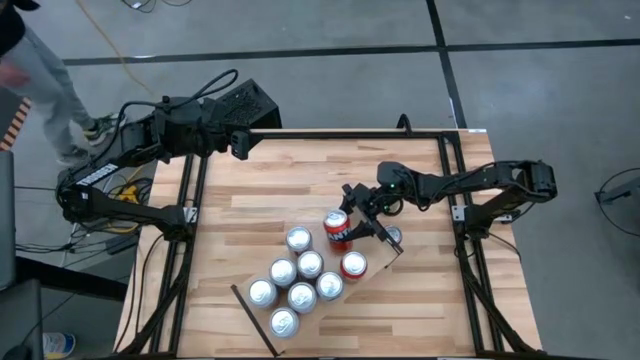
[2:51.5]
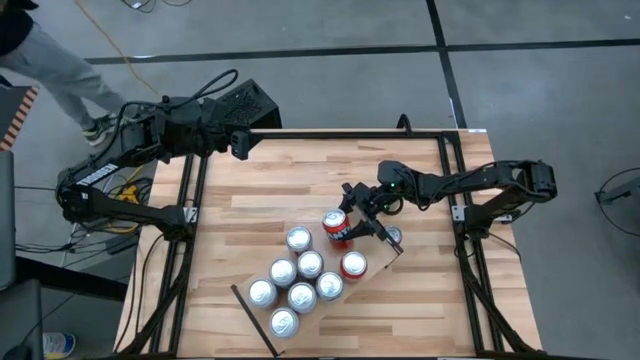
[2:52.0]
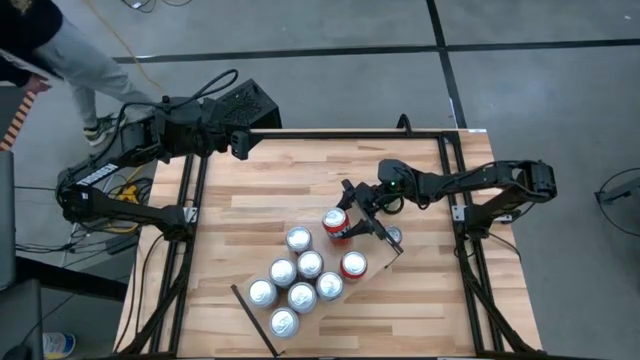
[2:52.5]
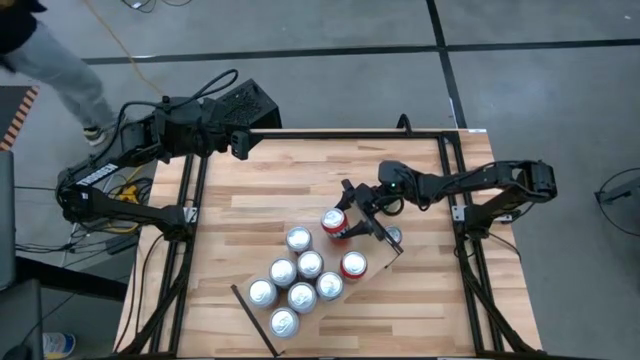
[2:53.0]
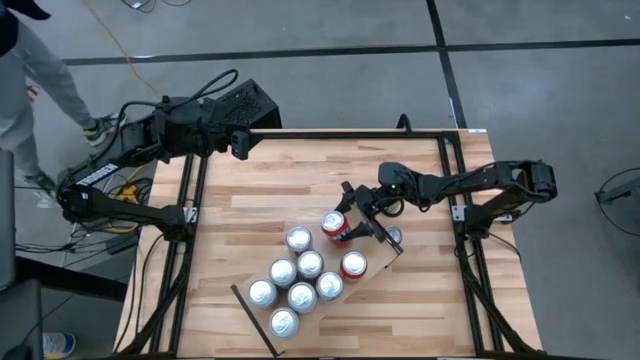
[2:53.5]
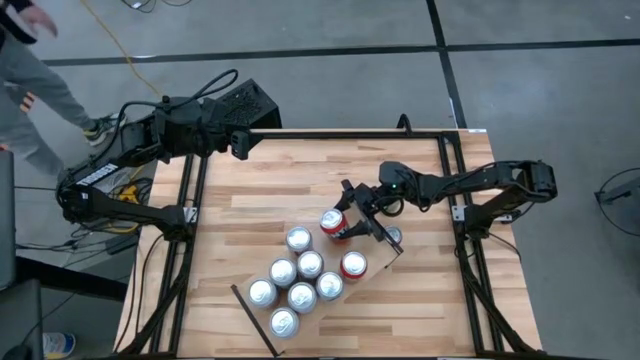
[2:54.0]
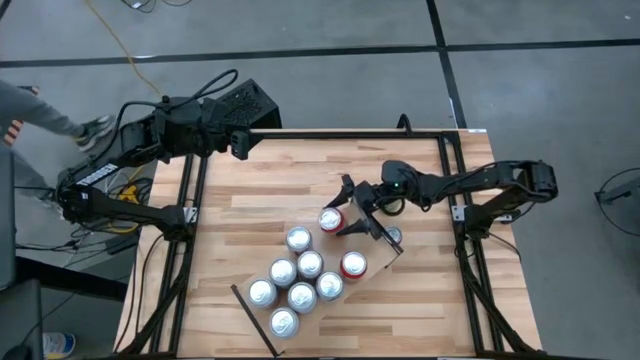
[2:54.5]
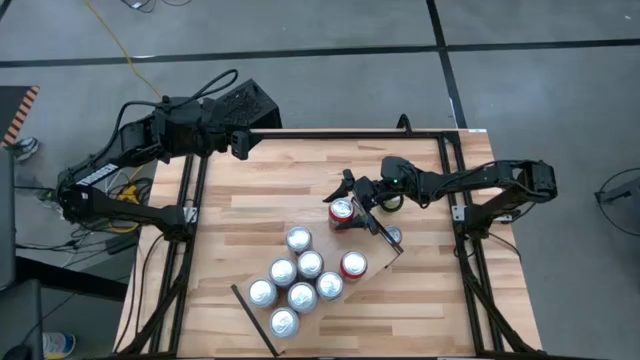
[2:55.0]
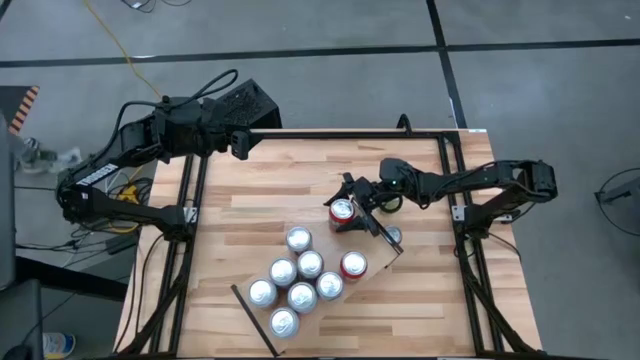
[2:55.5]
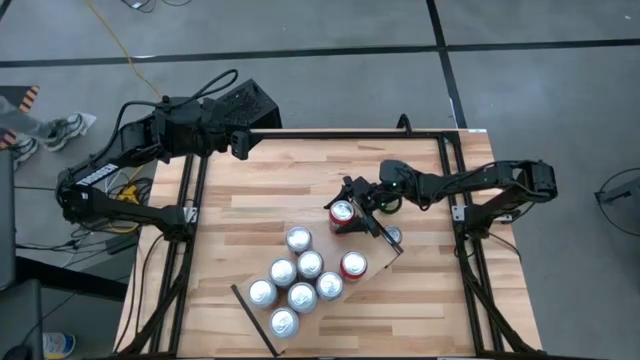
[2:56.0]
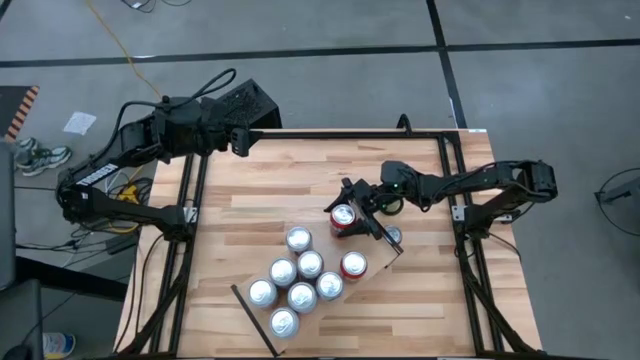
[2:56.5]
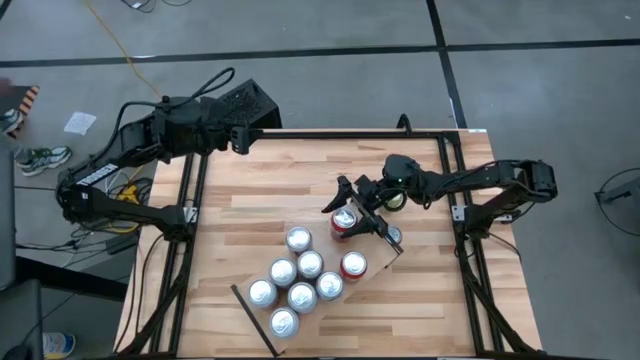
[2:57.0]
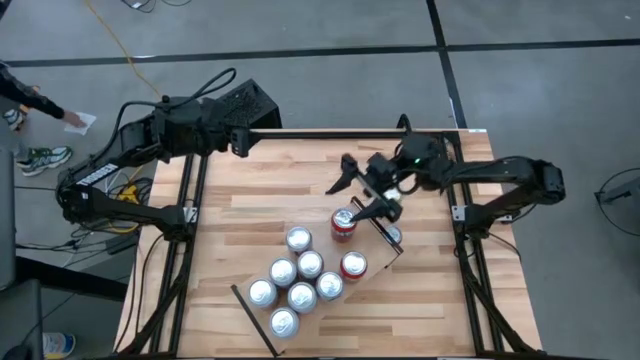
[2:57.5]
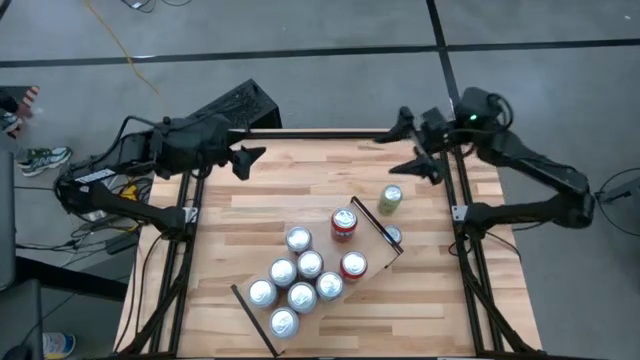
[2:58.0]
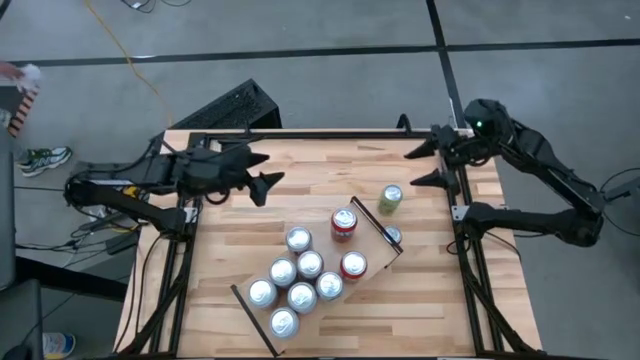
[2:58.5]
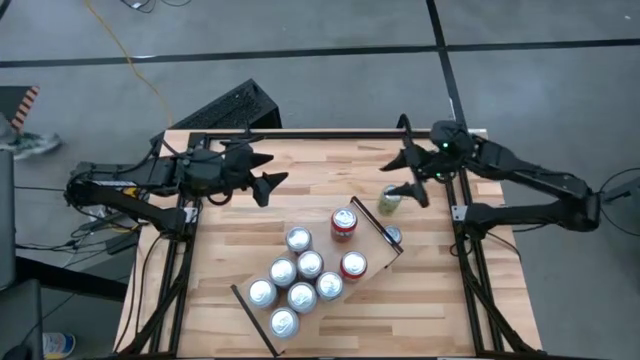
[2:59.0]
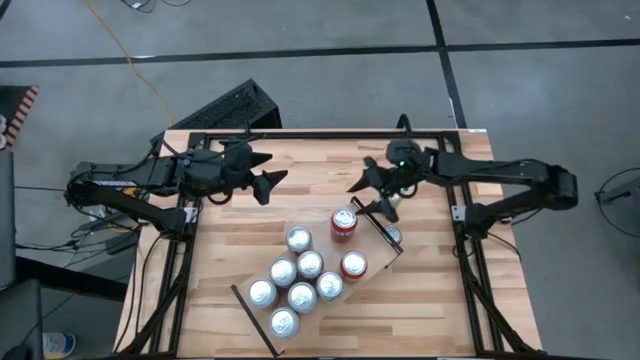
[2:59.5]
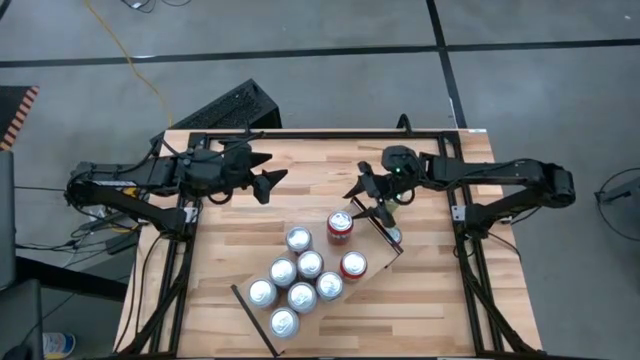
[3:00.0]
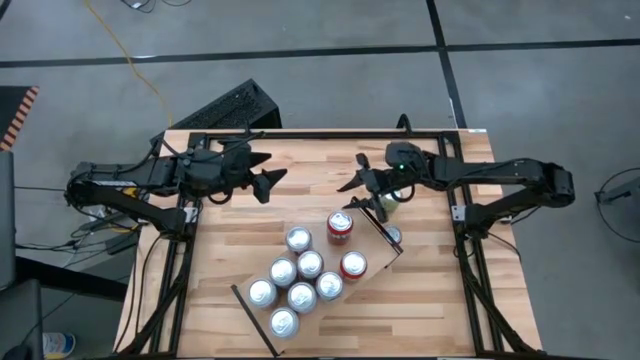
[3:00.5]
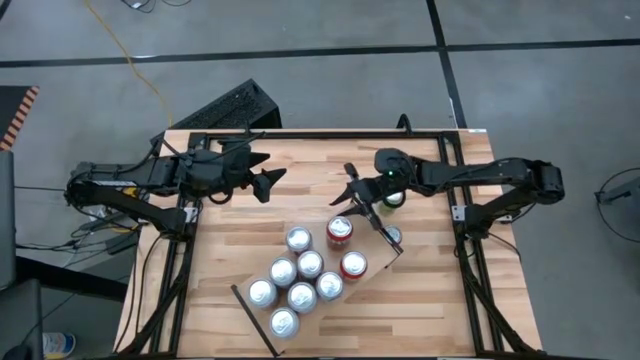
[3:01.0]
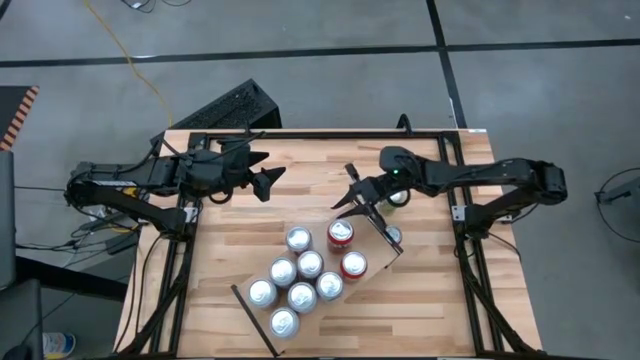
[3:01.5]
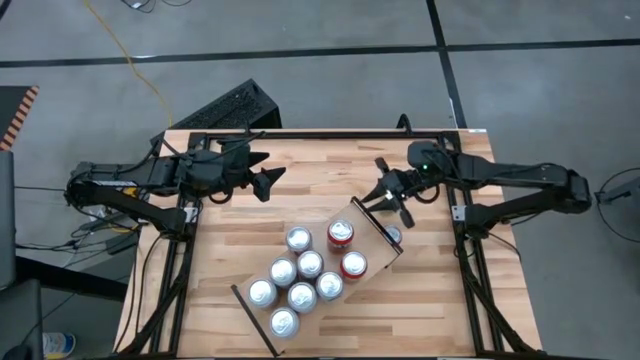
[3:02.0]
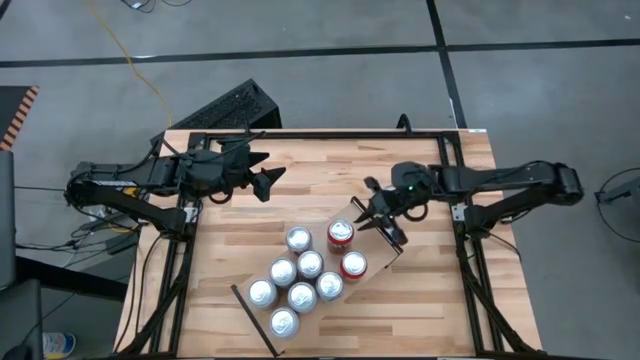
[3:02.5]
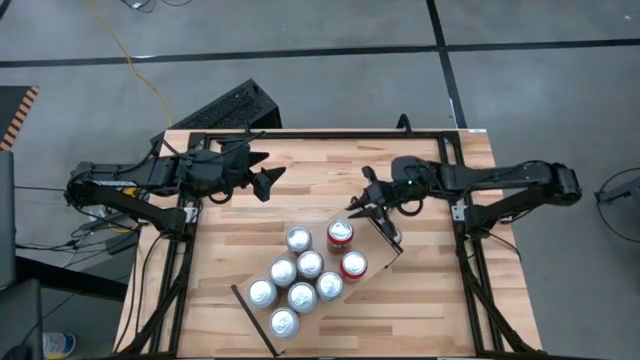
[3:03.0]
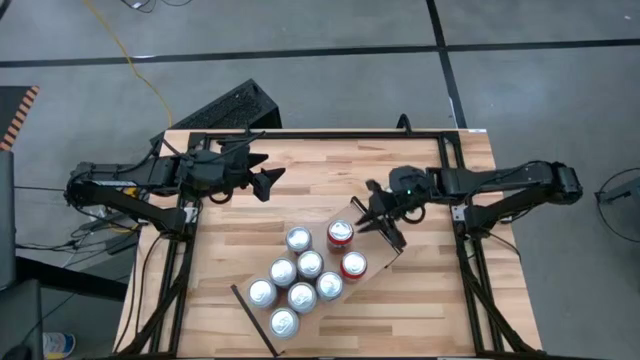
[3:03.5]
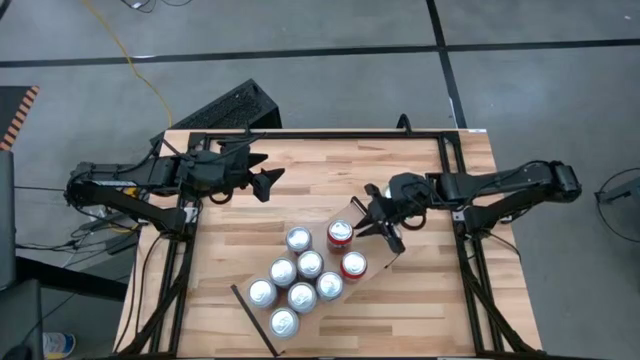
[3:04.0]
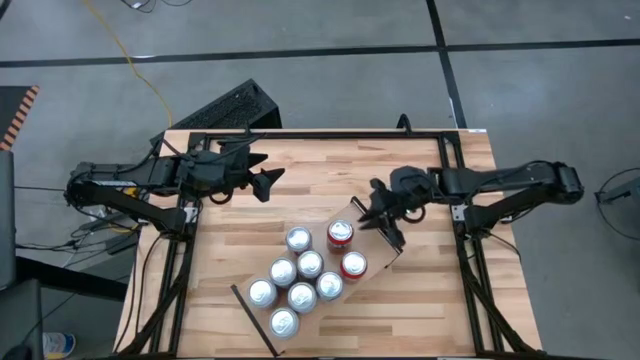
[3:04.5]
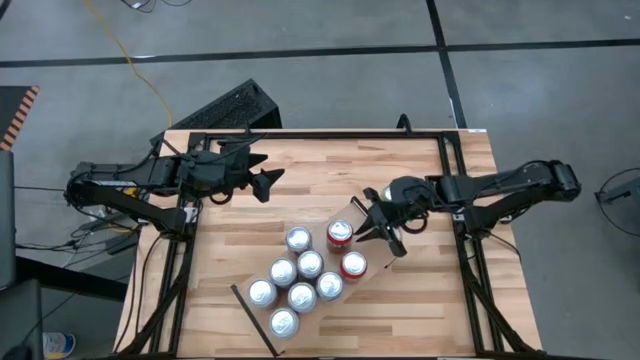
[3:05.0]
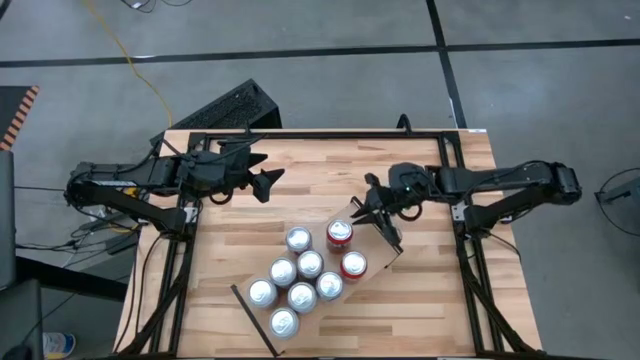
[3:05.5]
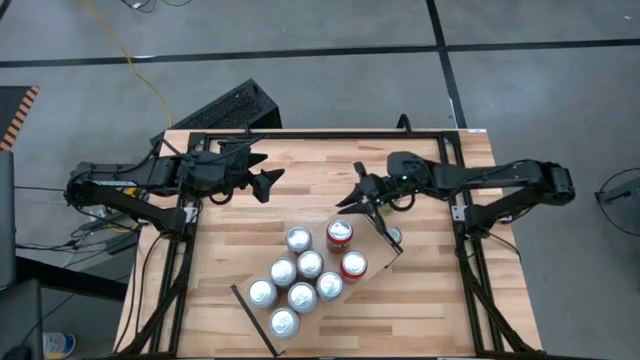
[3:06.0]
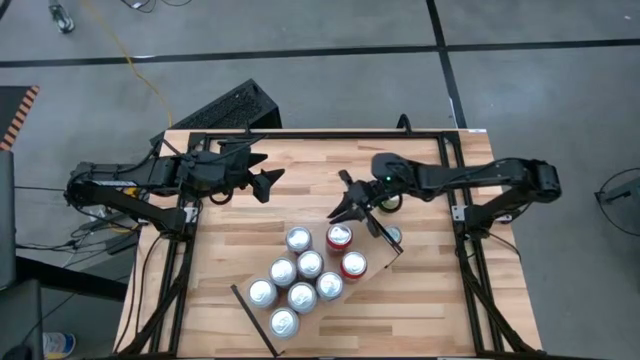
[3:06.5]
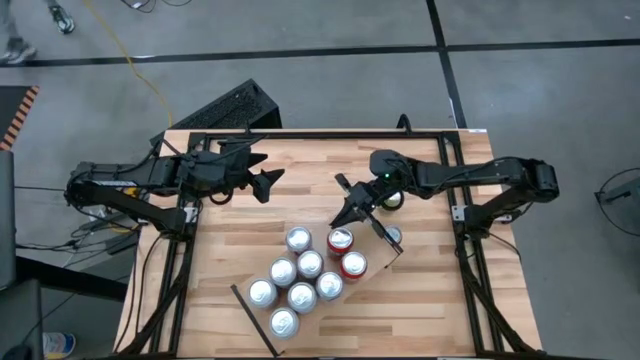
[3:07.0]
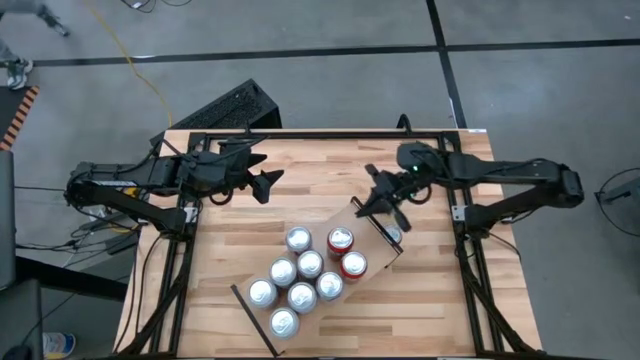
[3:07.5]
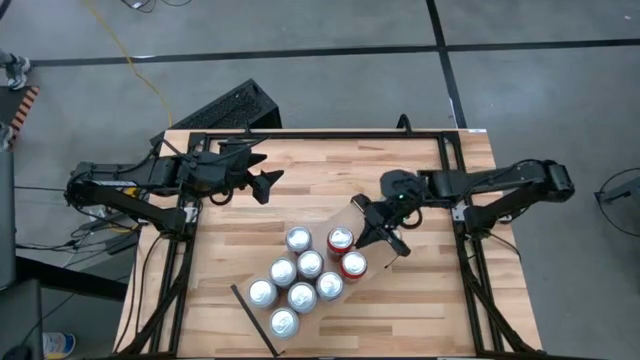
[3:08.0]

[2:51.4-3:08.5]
Task: Place canned beverage on shelf
Put the red soda can on the shelf aligned with the other red soda can

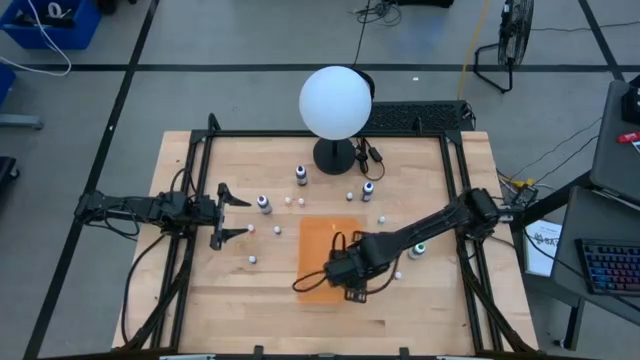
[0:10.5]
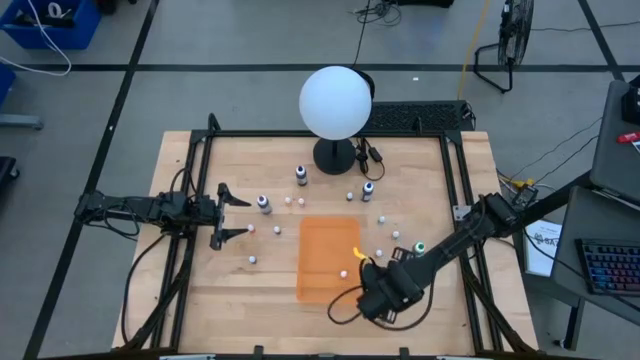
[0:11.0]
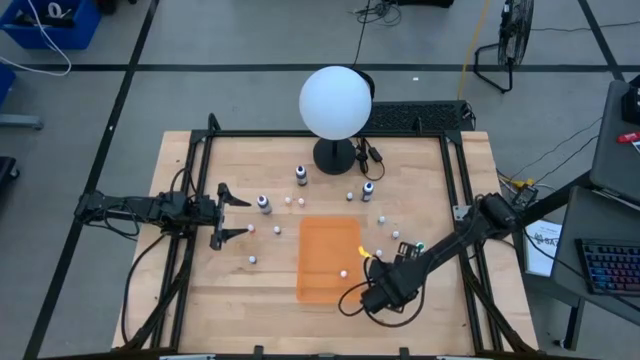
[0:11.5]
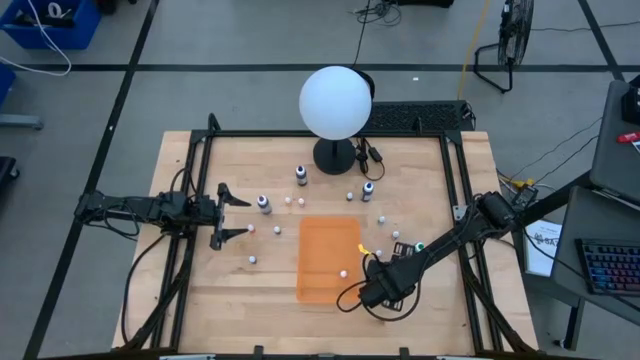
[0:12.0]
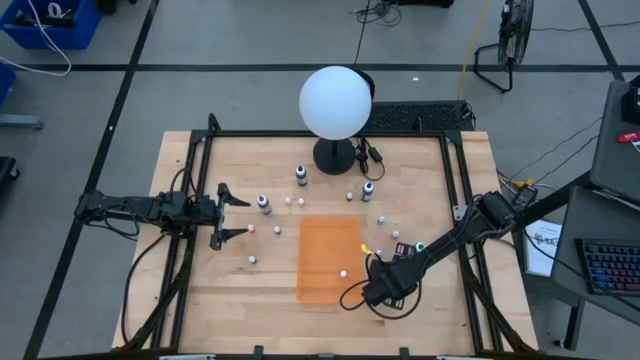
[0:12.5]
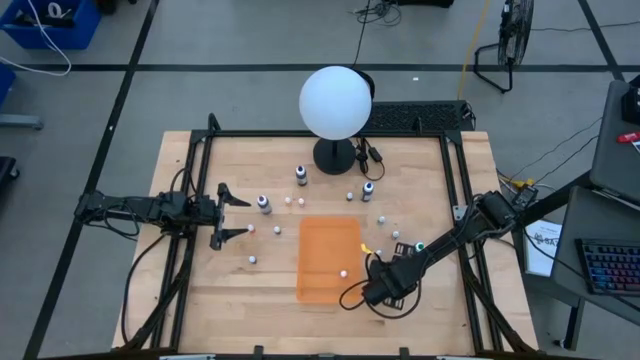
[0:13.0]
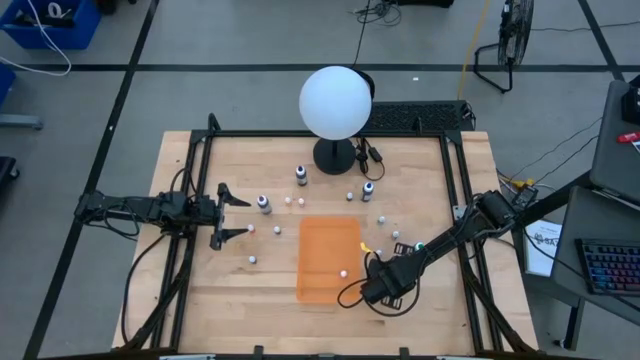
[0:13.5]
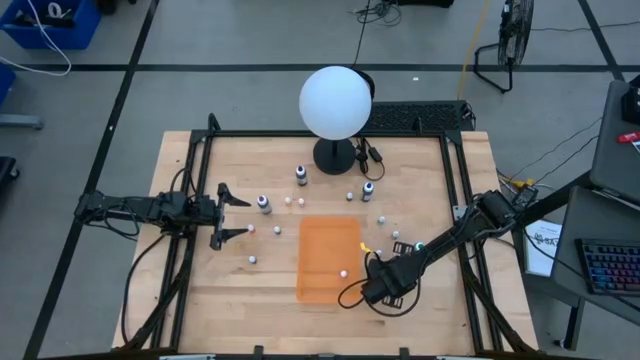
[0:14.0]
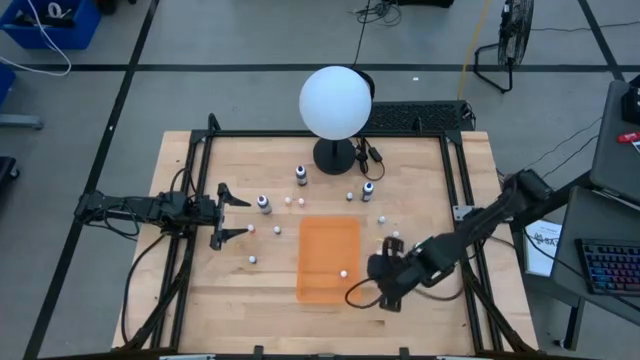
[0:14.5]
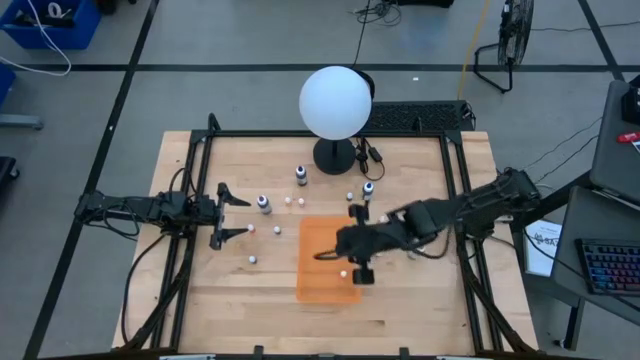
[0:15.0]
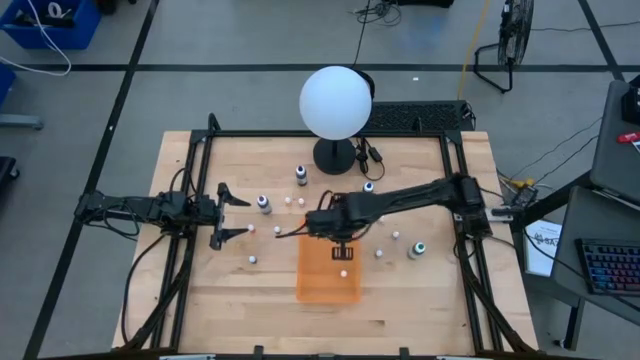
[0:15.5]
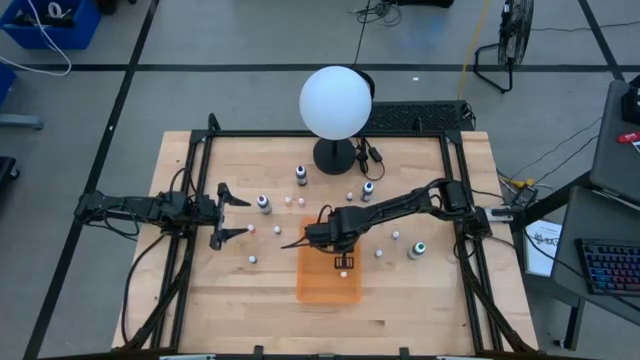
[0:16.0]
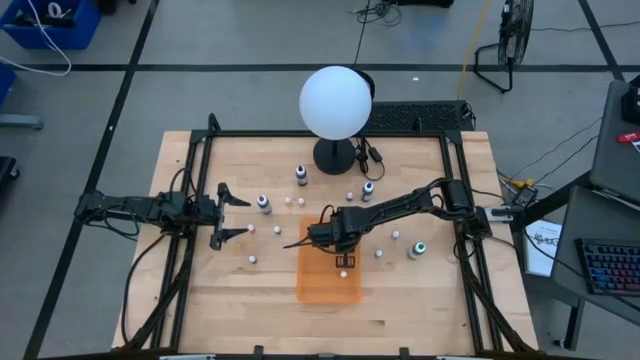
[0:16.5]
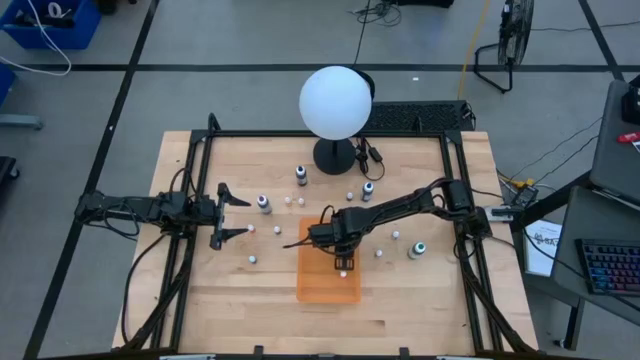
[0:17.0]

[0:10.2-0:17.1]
Task: Pick & Place food coloring
Put the small red food coloring bottle into the orange bin
